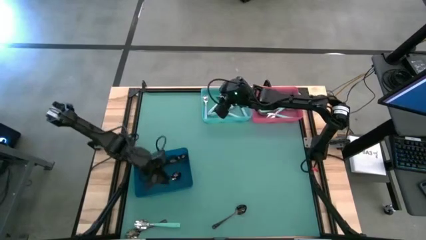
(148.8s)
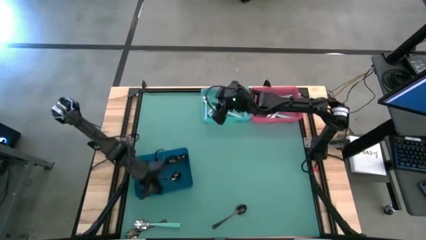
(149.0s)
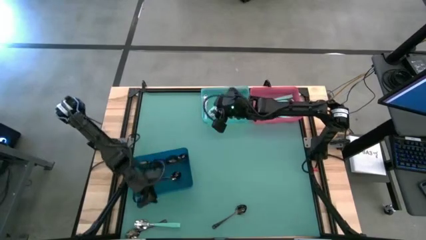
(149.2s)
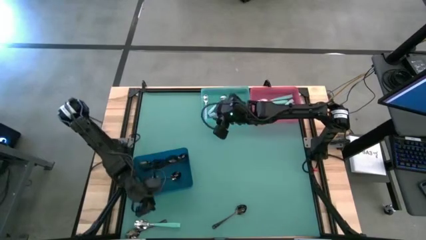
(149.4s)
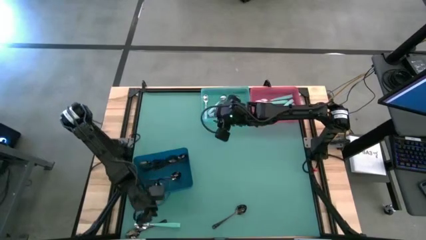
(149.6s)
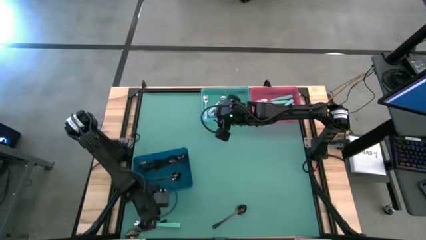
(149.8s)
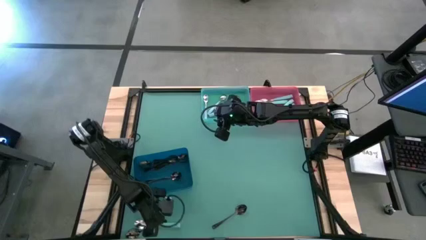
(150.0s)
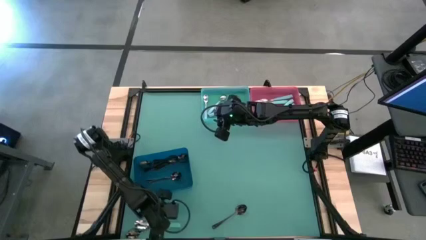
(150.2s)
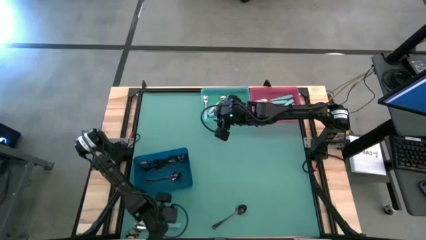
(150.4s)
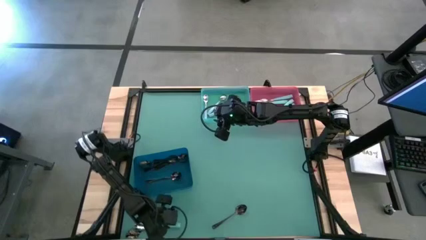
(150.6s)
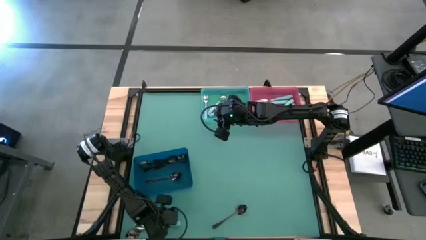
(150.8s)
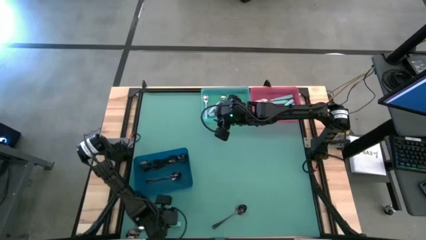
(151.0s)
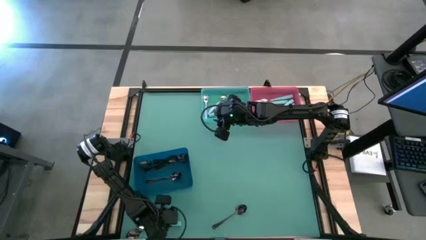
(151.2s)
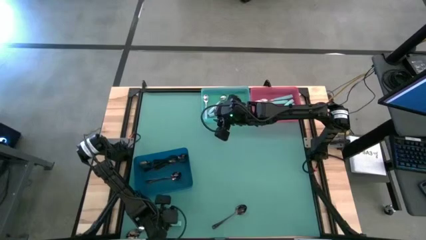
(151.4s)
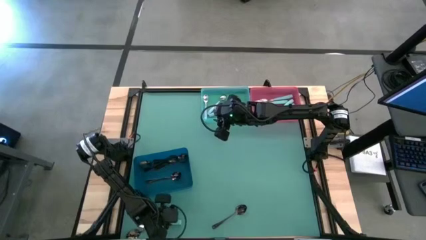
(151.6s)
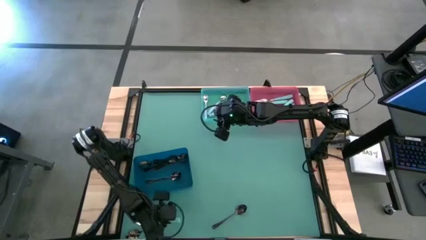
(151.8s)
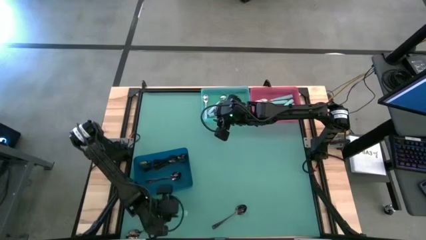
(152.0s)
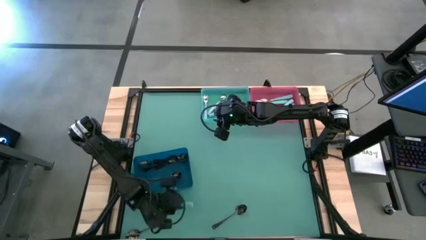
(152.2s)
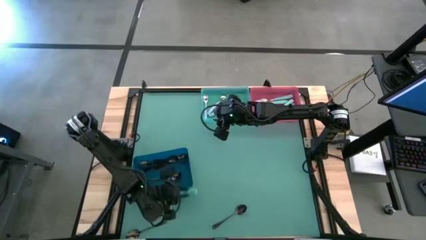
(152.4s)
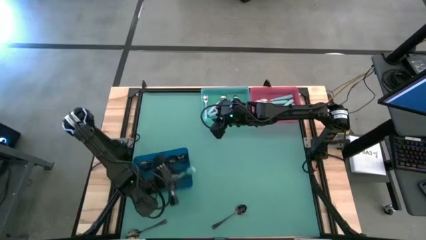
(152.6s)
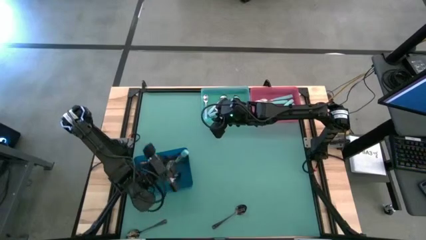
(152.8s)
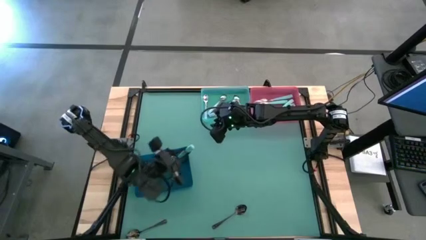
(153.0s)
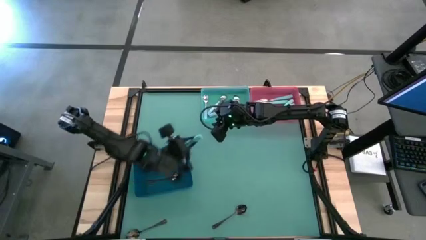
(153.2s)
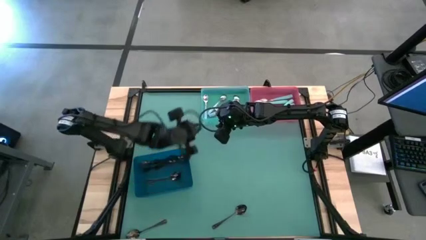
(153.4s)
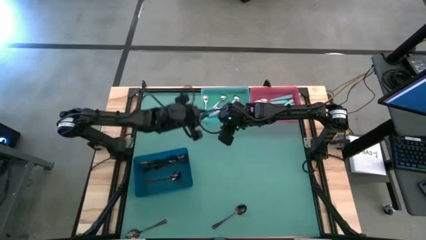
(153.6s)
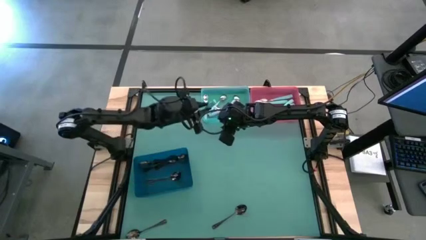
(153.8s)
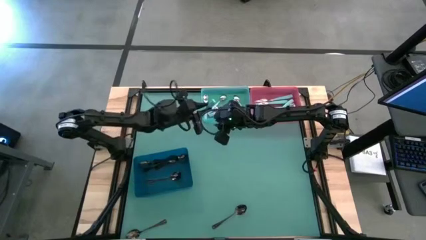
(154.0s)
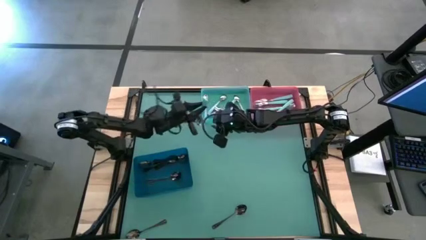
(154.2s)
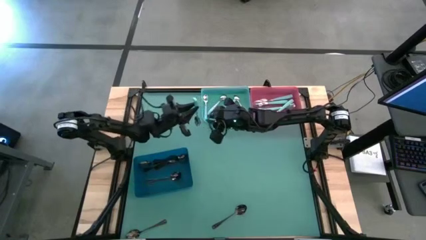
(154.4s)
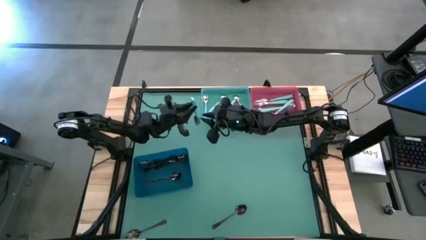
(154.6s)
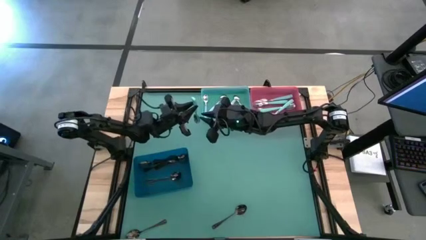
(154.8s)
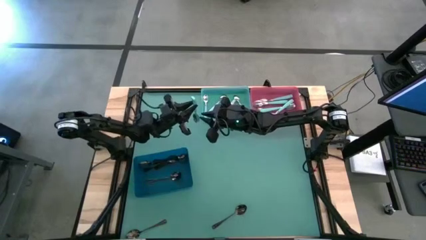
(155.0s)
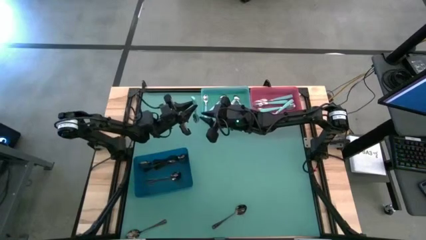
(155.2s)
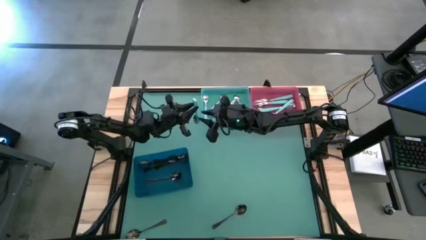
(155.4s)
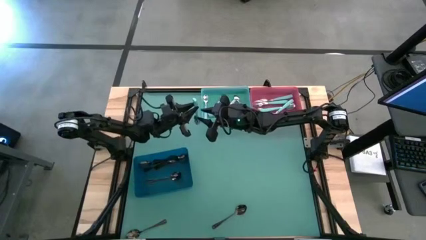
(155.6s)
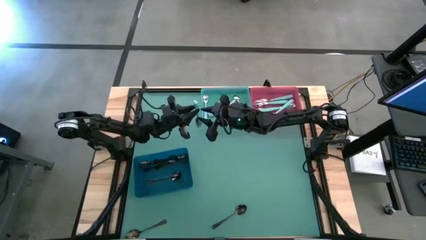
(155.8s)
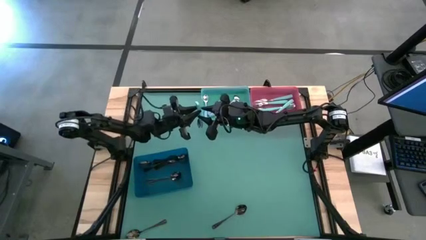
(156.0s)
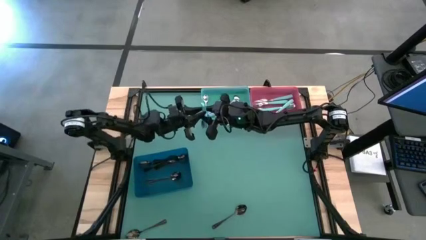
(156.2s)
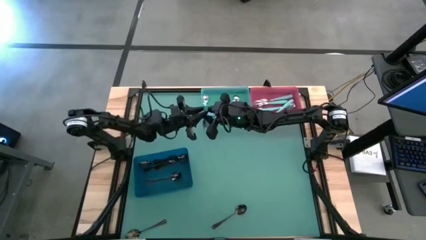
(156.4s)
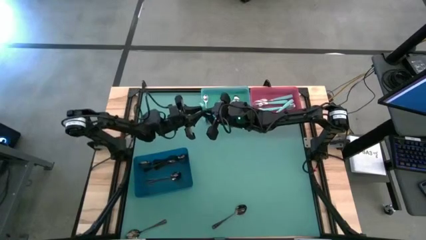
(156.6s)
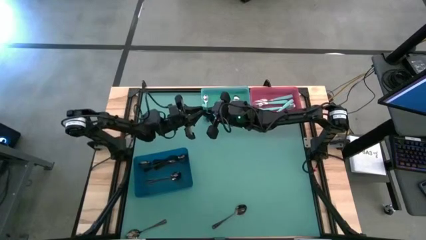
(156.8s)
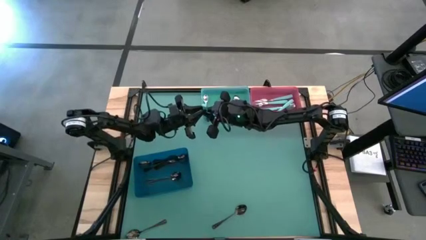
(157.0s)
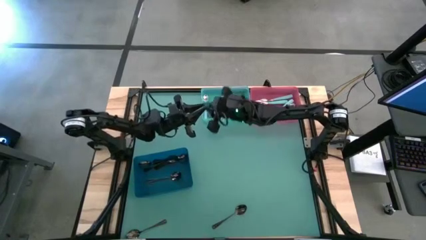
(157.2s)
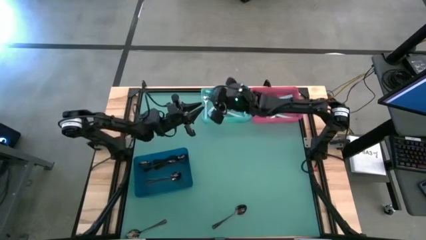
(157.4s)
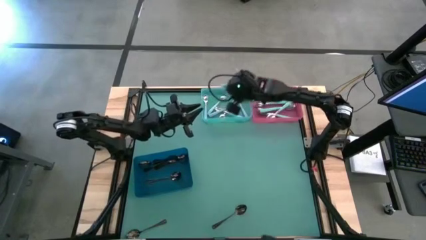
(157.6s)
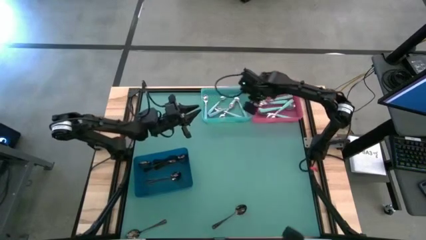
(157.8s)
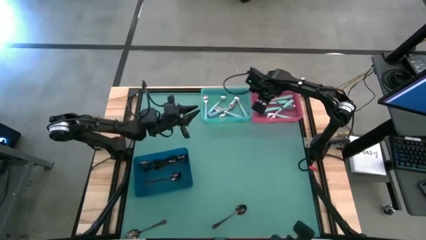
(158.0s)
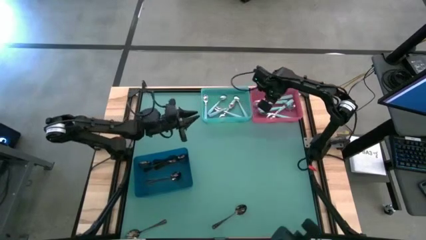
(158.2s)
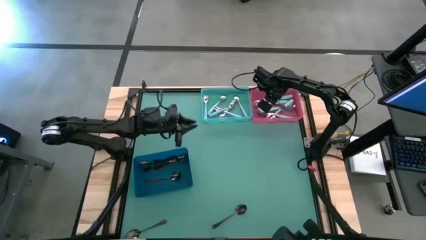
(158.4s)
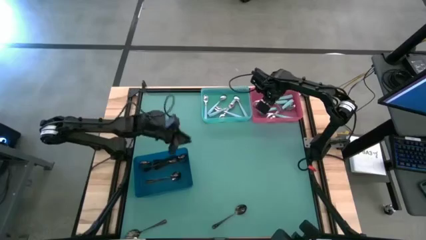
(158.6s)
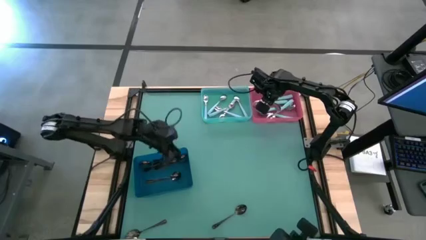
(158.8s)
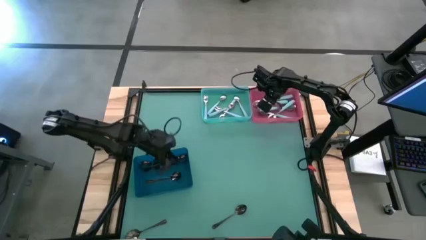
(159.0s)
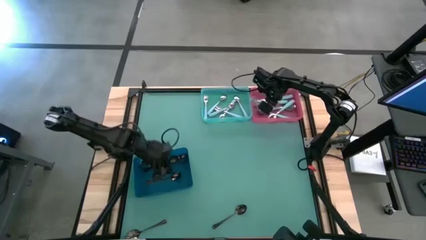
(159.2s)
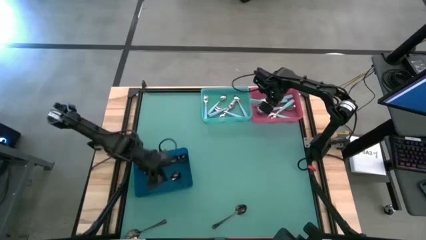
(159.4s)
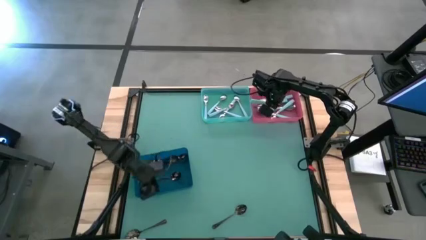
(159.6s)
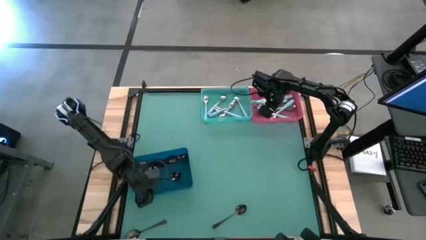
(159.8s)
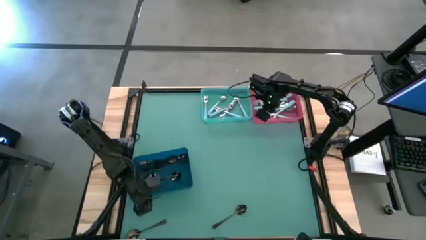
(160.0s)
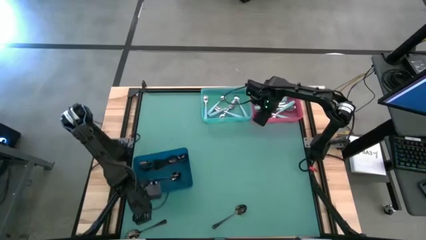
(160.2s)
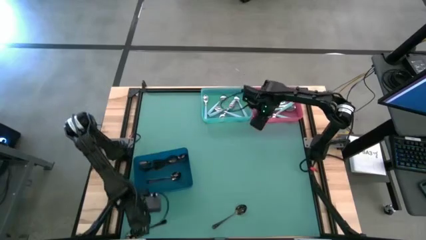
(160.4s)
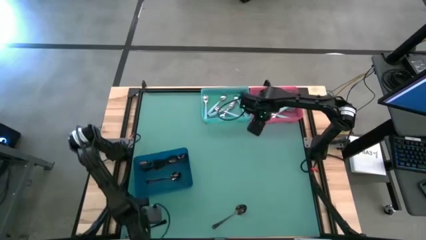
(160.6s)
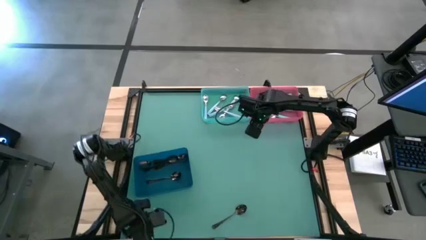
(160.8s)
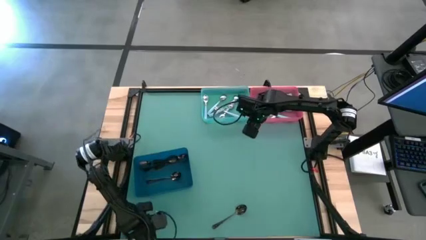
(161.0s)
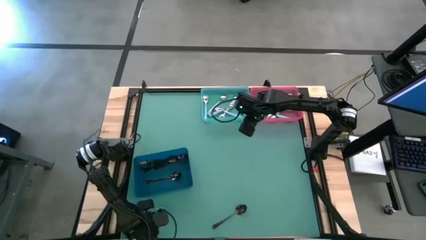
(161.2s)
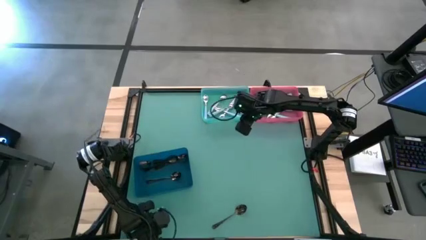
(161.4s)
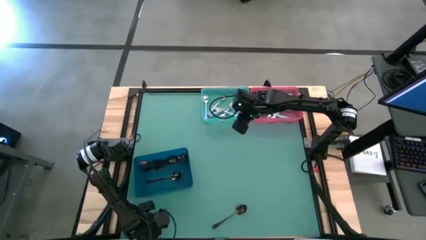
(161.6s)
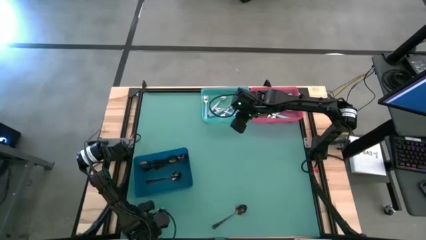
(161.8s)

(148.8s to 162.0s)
Task: Sort silverware by color (type)
Put the green spoon into the red bin

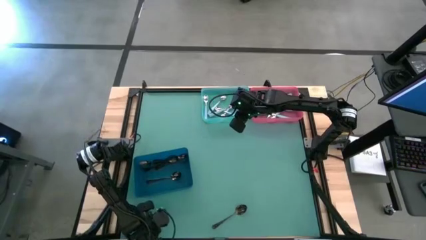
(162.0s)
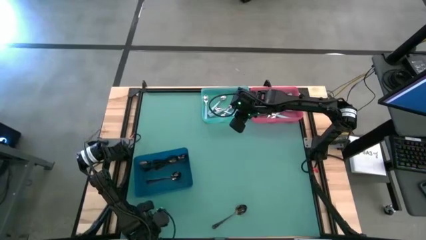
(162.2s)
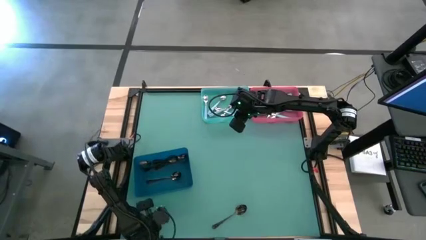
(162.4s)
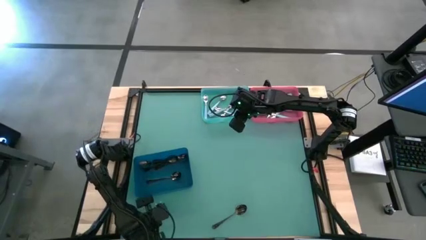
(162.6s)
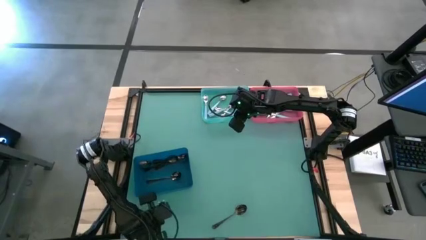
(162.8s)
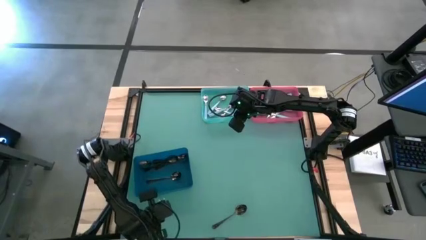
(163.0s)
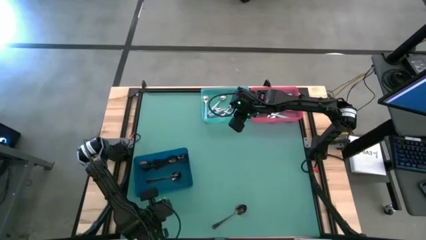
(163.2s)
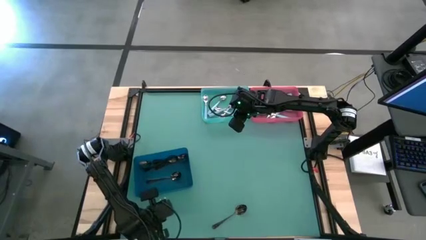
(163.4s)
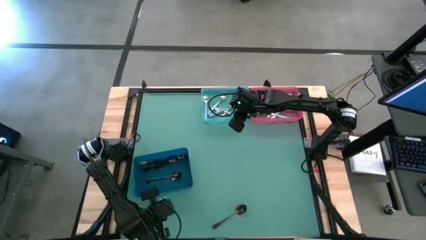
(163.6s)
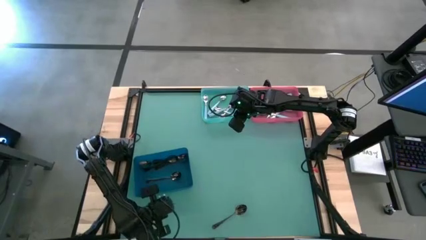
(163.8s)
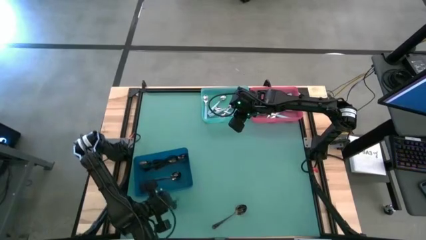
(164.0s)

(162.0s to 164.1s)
Put the left black spoon into the dark blue bin
